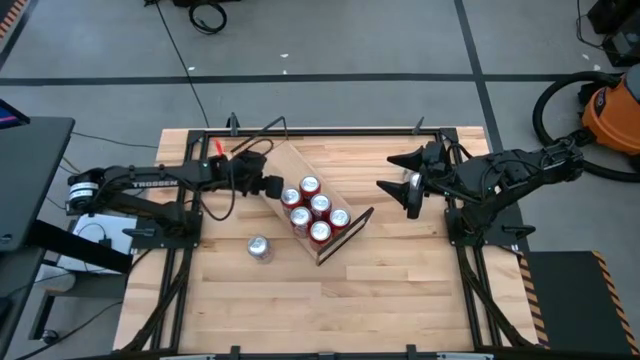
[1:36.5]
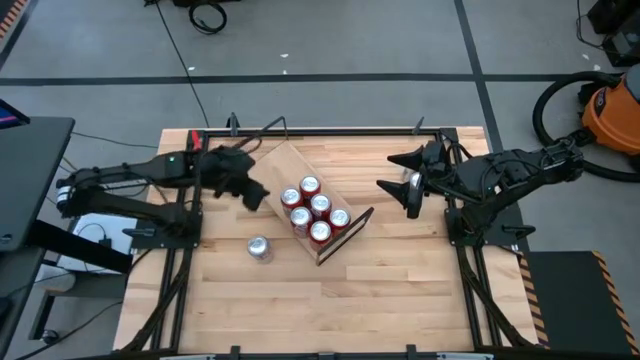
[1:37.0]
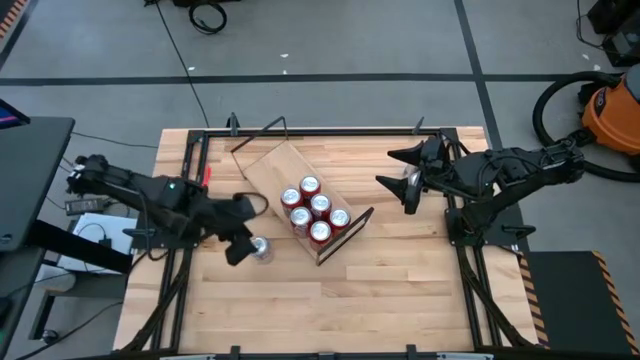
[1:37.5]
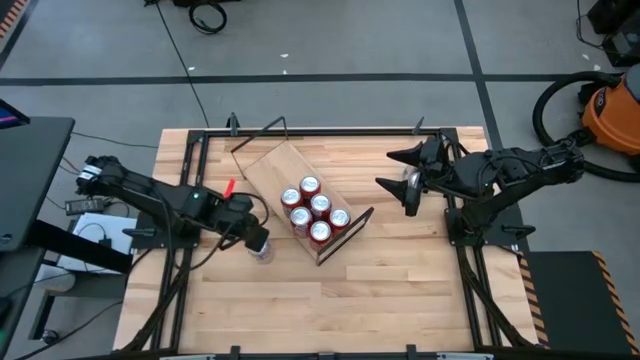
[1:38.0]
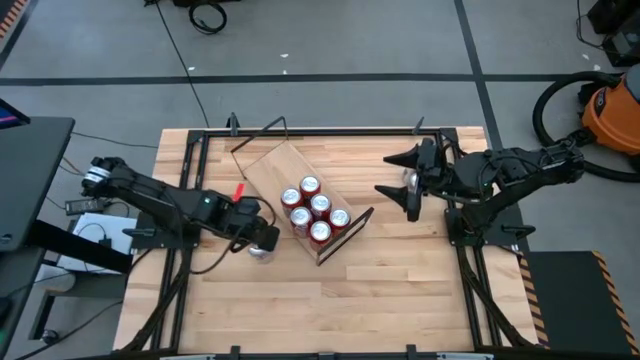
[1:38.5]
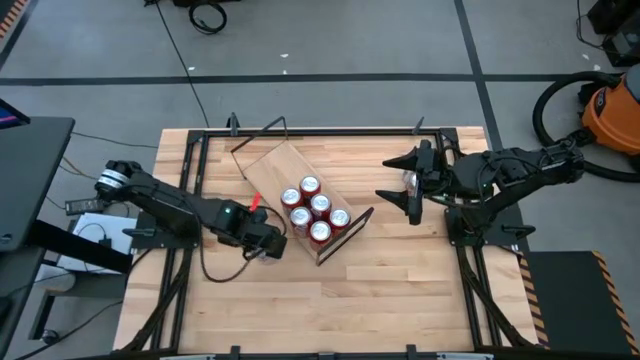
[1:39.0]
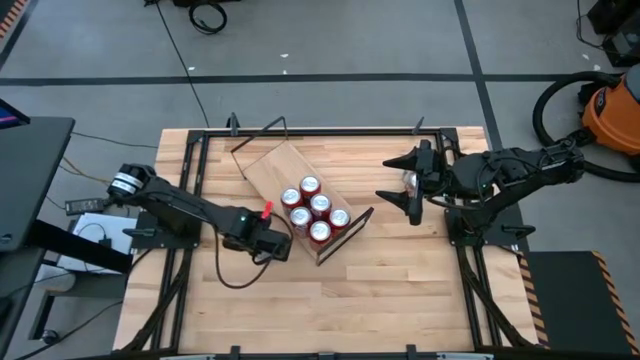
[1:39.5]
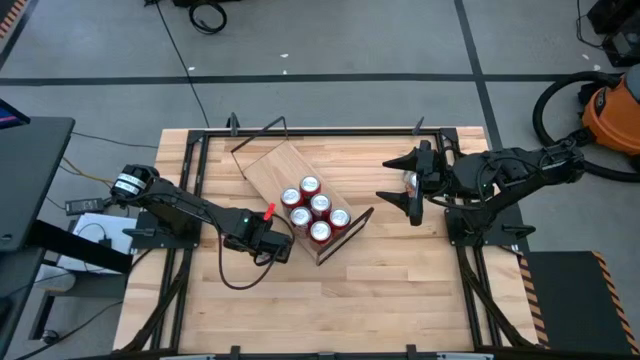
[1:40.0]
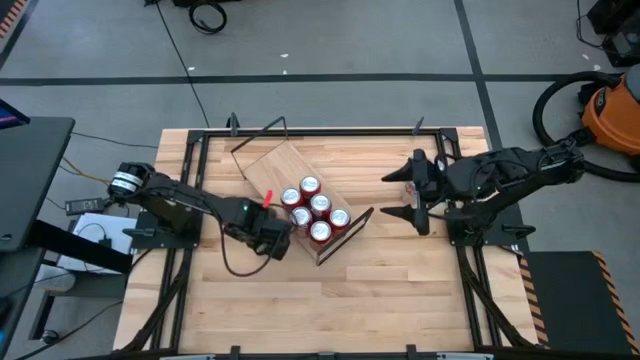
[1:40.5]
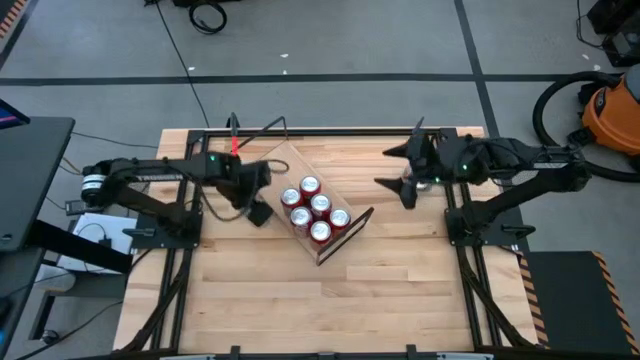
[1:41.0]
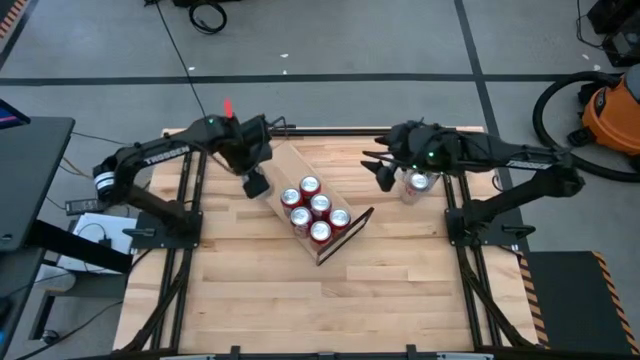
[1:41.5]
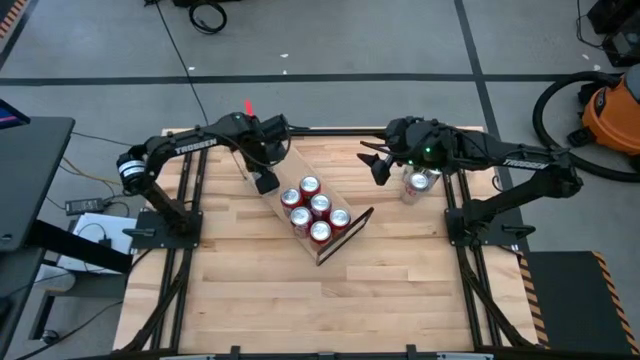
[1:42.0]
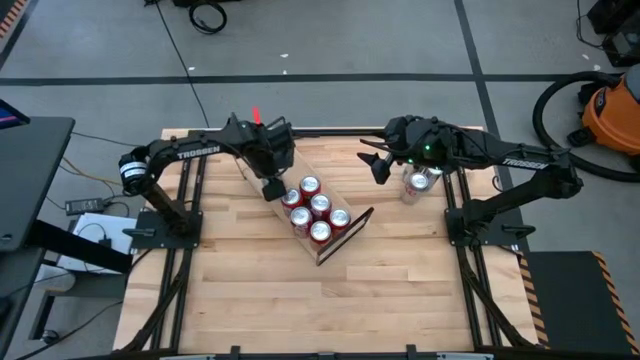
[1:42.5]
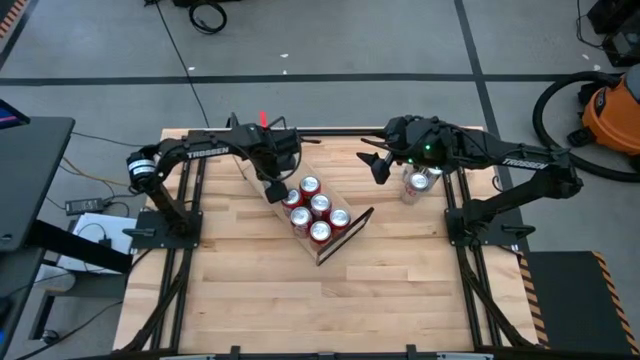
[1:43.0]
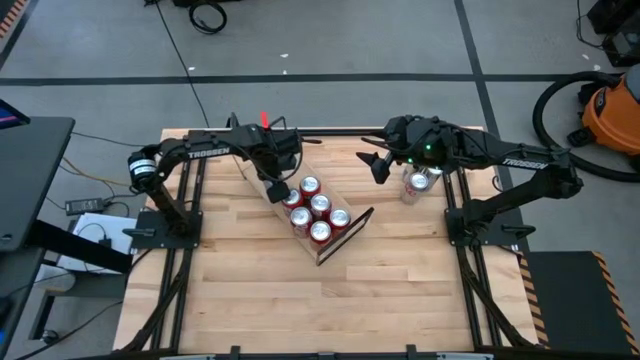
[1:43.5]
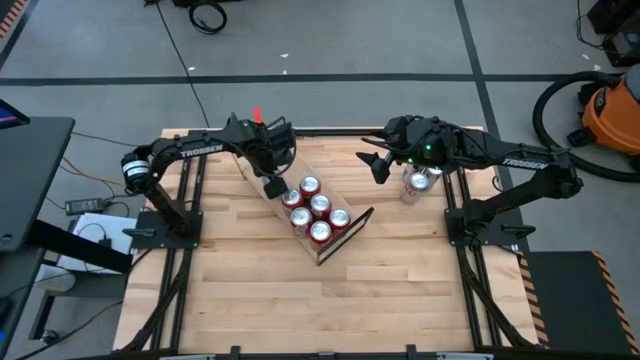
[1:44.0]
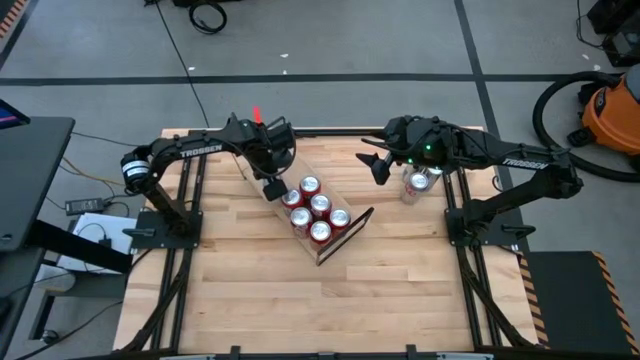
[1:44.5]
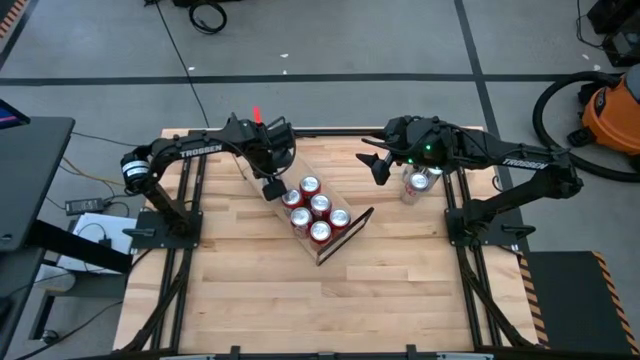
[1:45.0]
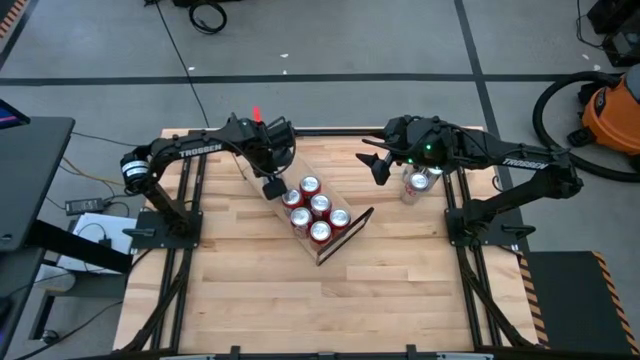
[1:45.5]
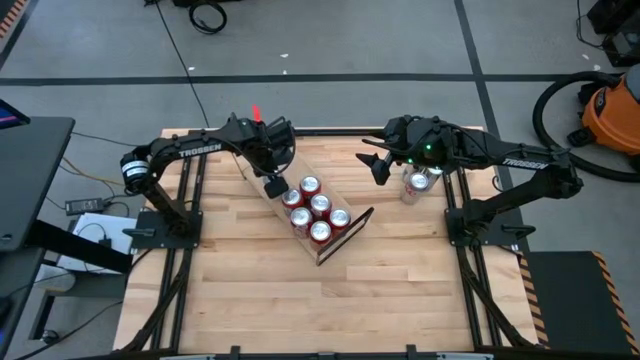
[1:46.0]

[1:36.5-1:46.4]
Task: Place canned beverage on shelf
Put the left silver and red soda can on the shelf

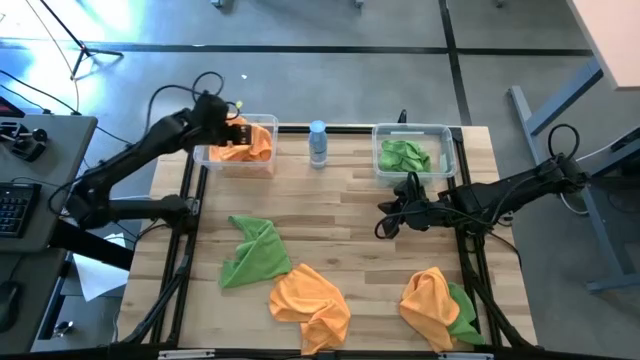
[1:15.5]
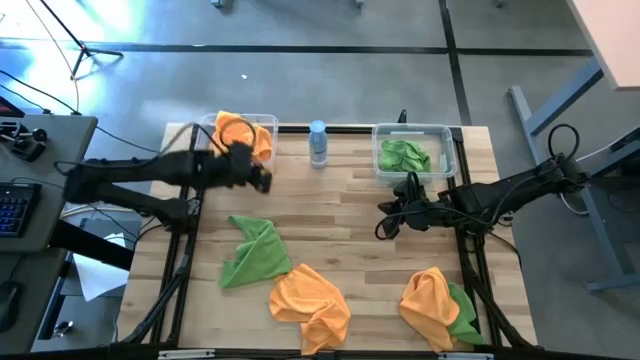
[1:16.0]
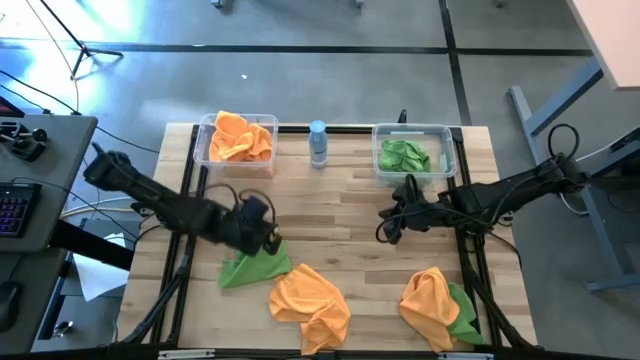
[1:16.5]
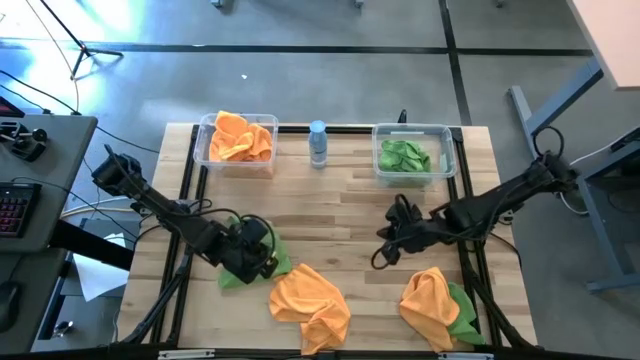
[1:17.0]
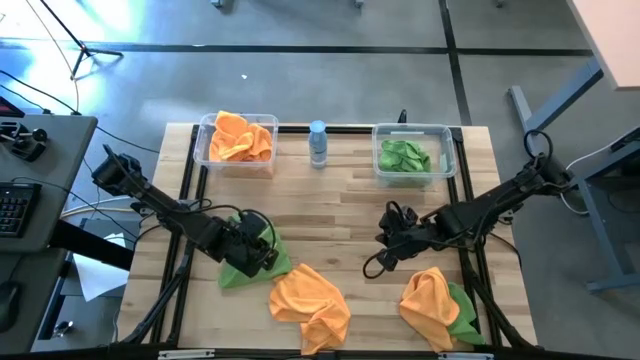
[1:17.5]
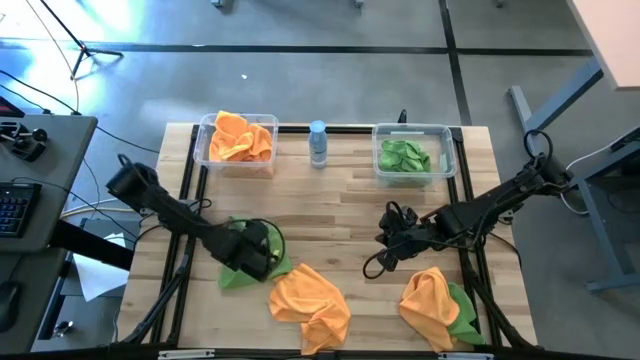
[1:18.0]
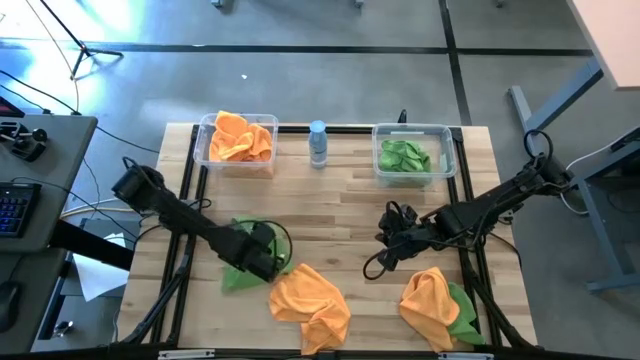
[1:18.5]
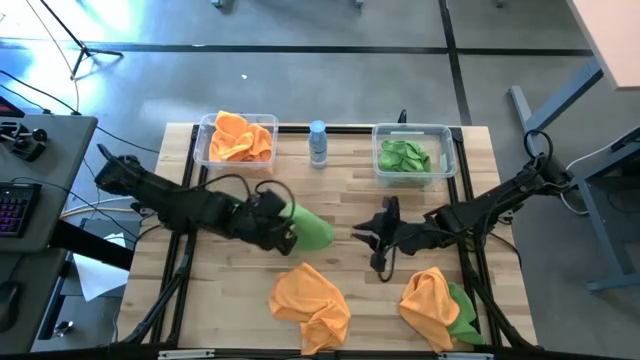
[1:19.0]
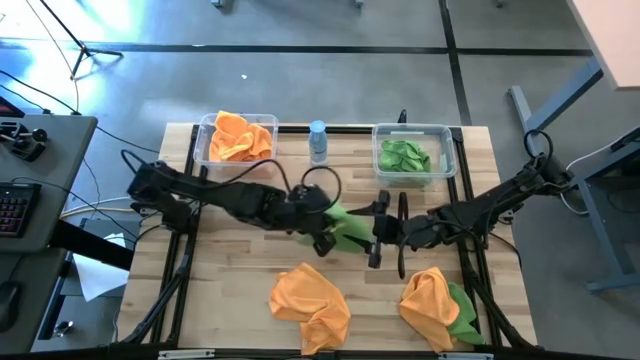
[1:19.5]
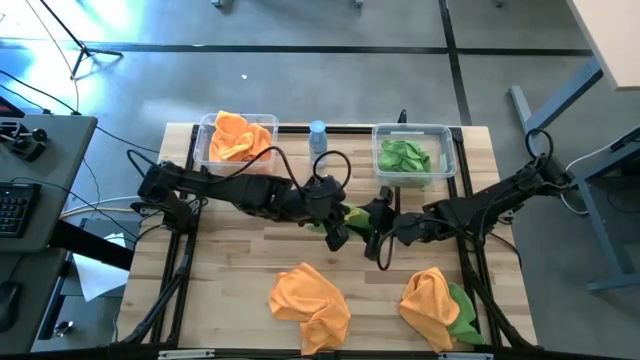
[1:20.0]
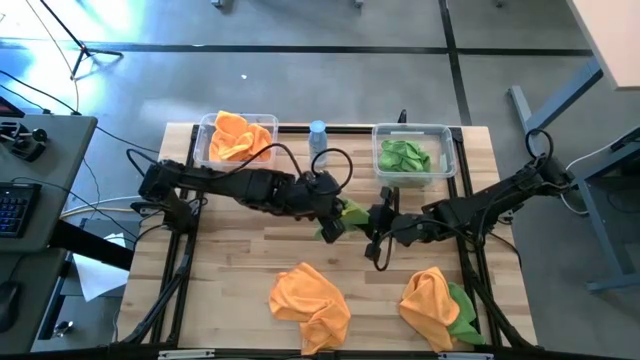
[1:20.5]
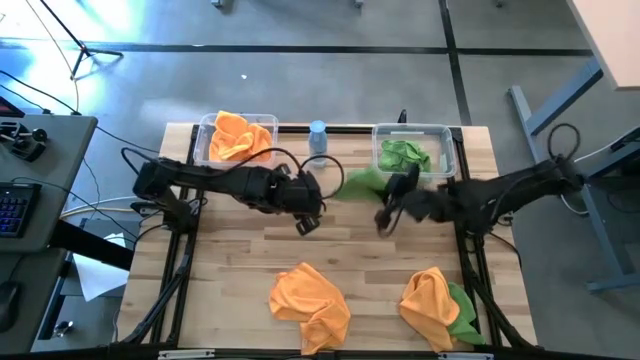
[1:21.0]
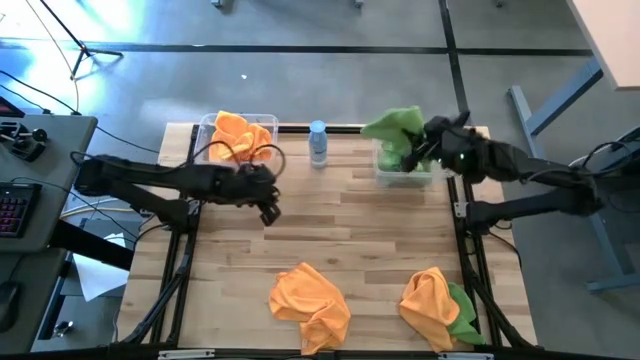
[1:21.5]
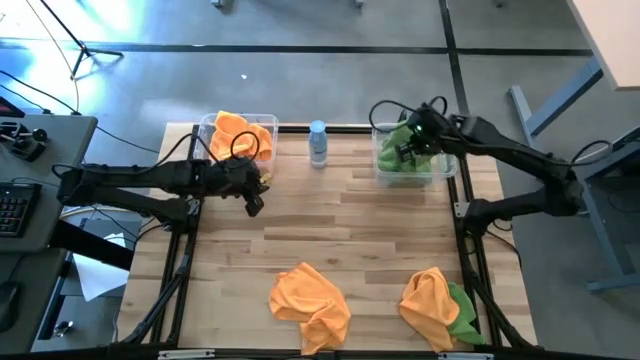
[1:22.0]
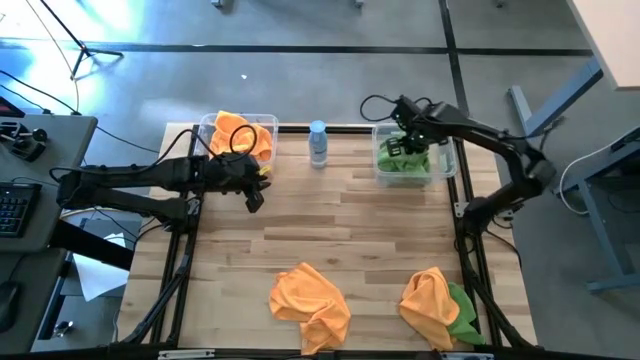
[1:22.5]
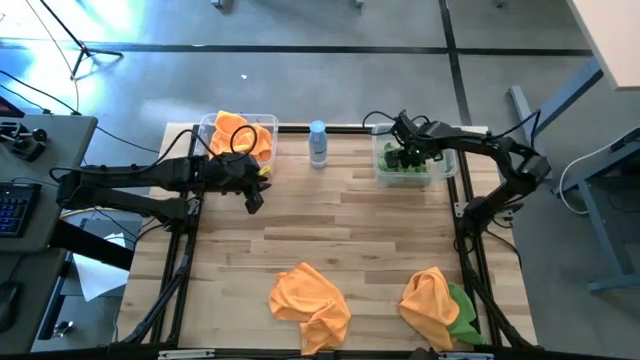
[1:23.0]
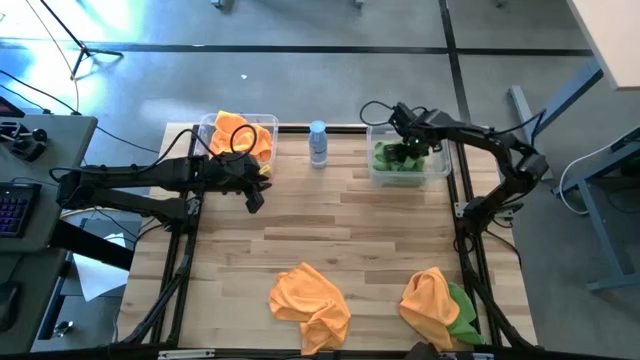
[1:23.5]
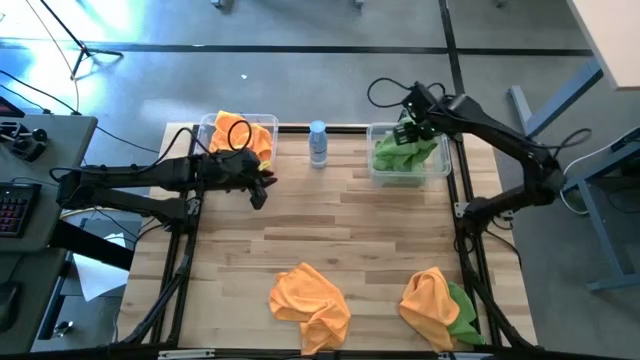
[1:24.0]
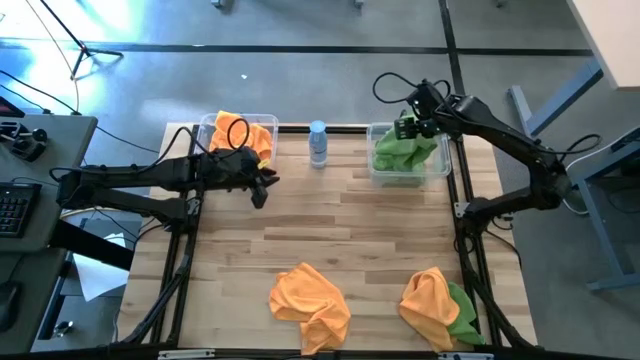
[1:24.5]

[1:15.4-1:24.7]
Task: Sort microfiber towel by color & place in baskets
Put the green towel into the right transparent bin
